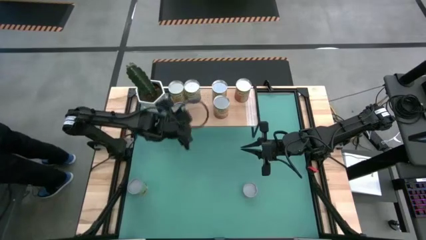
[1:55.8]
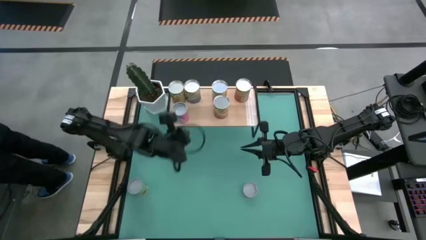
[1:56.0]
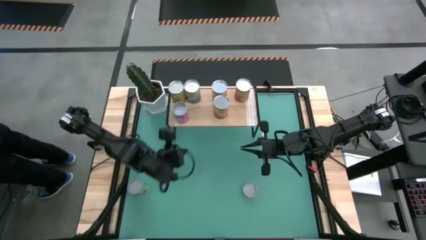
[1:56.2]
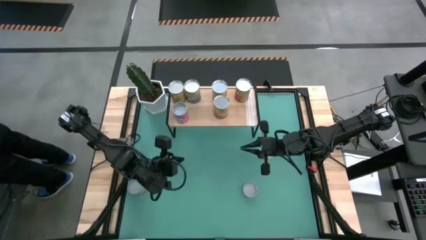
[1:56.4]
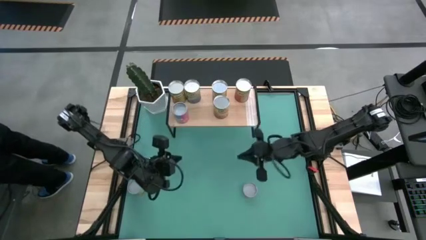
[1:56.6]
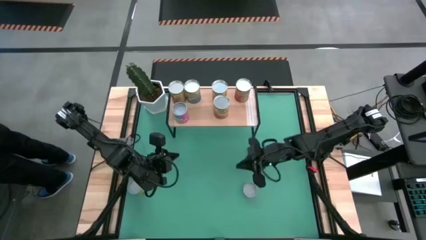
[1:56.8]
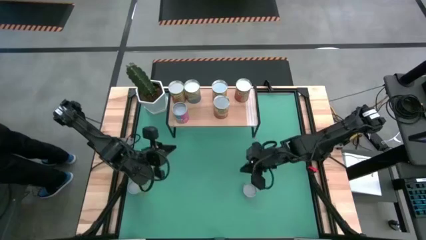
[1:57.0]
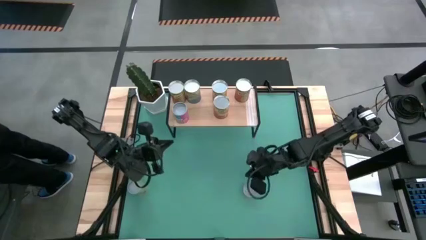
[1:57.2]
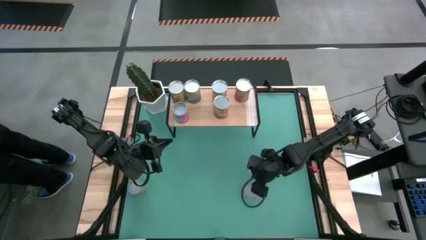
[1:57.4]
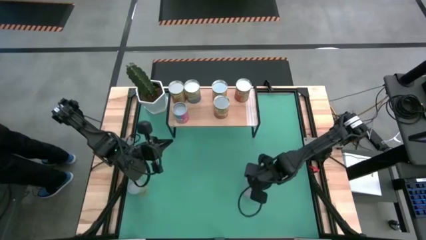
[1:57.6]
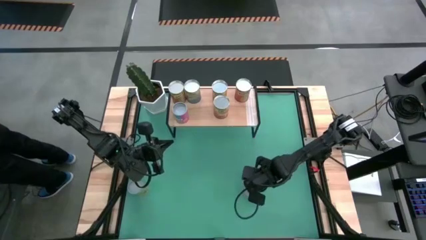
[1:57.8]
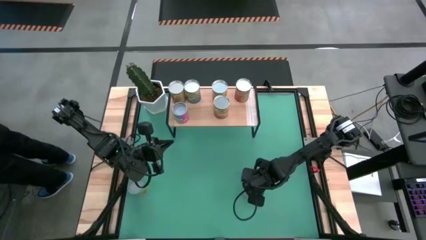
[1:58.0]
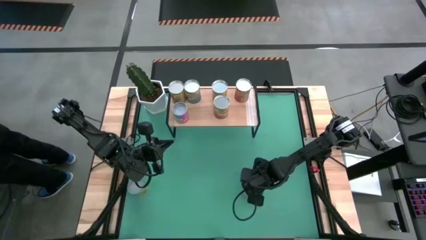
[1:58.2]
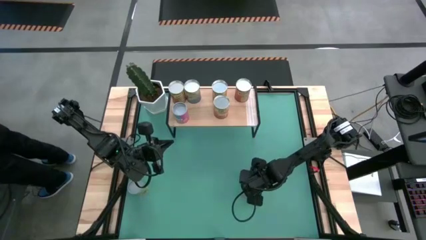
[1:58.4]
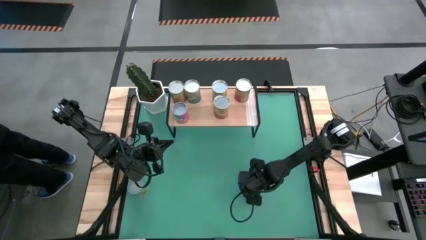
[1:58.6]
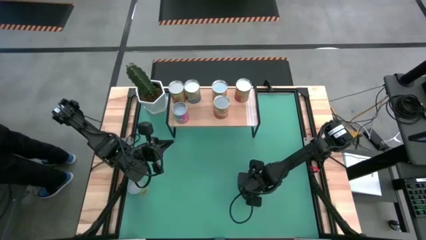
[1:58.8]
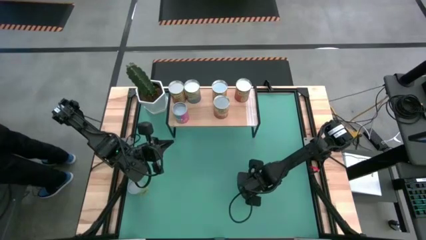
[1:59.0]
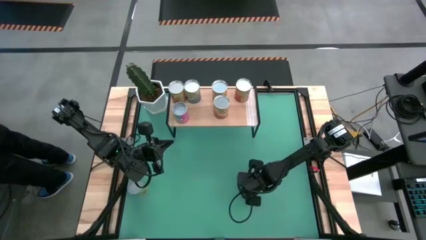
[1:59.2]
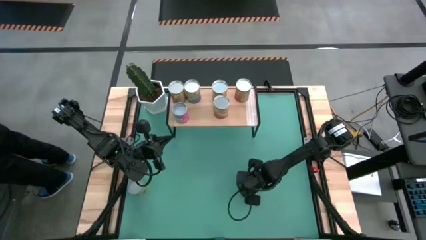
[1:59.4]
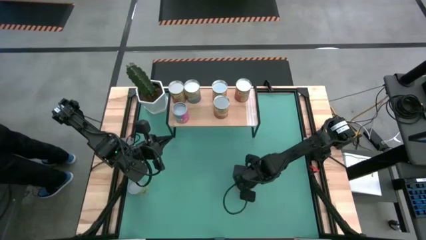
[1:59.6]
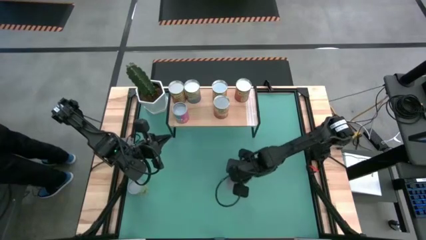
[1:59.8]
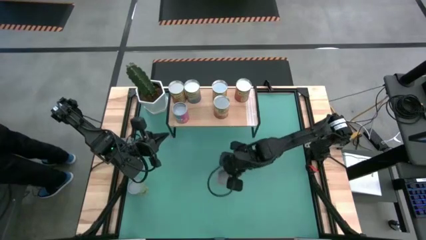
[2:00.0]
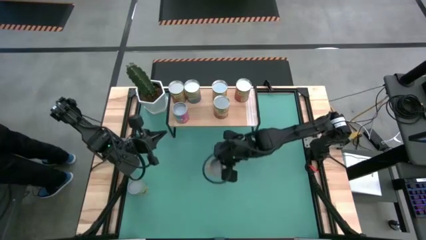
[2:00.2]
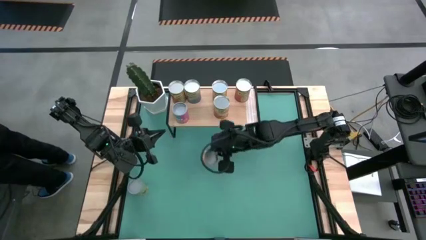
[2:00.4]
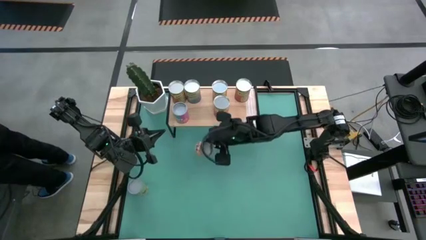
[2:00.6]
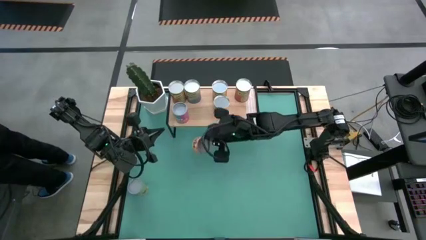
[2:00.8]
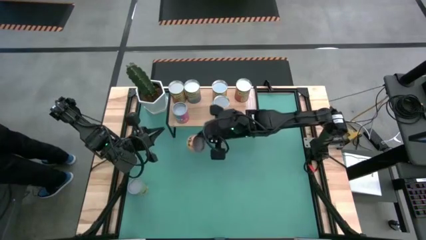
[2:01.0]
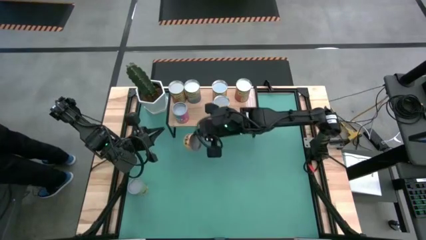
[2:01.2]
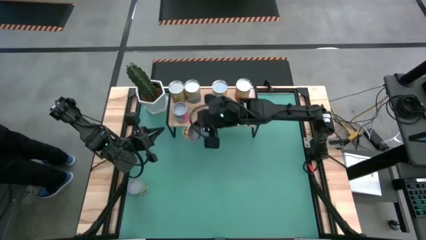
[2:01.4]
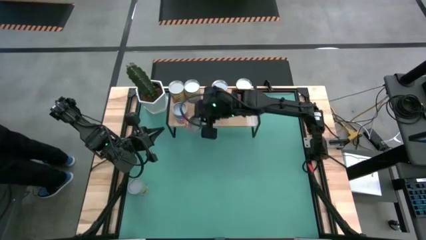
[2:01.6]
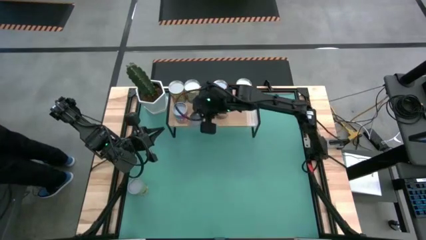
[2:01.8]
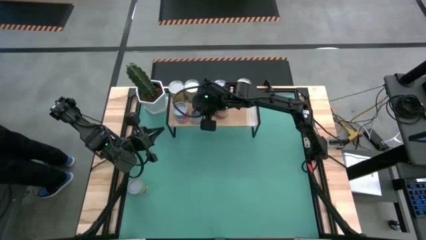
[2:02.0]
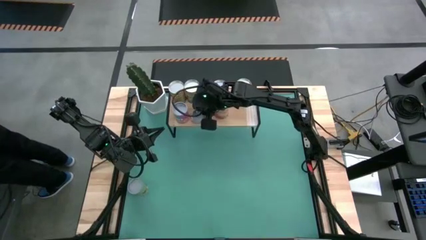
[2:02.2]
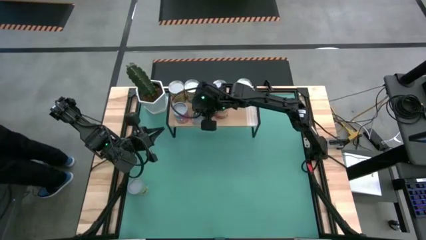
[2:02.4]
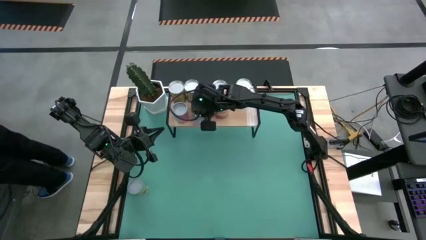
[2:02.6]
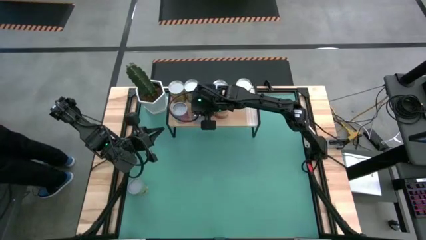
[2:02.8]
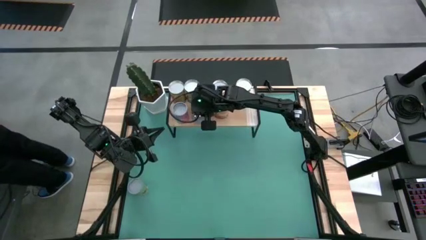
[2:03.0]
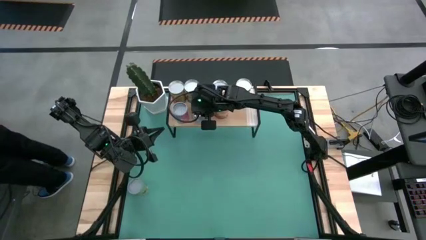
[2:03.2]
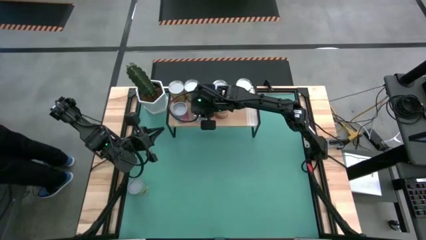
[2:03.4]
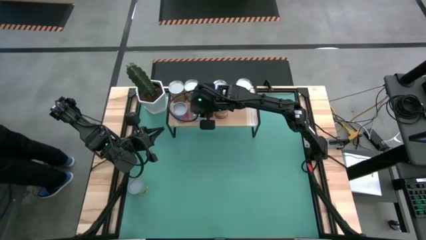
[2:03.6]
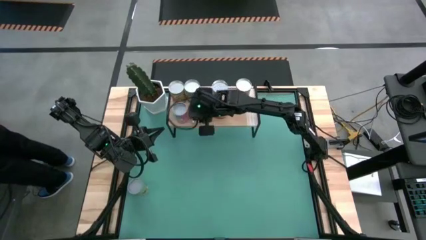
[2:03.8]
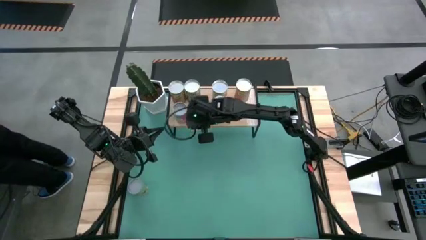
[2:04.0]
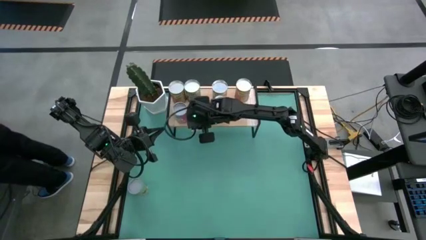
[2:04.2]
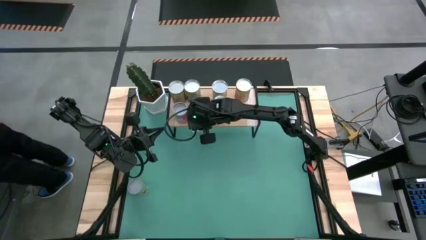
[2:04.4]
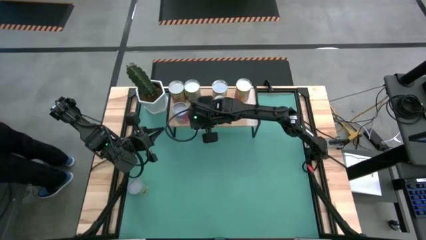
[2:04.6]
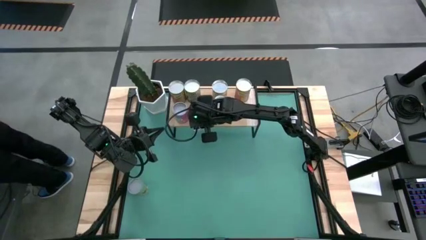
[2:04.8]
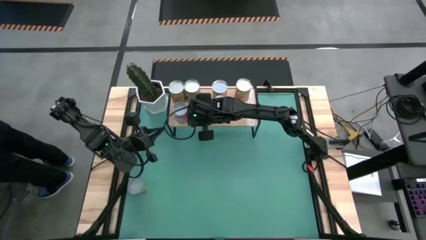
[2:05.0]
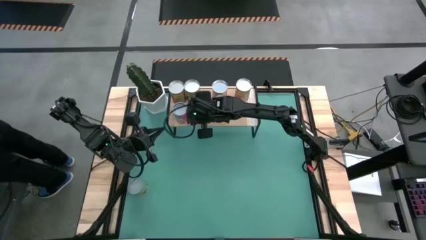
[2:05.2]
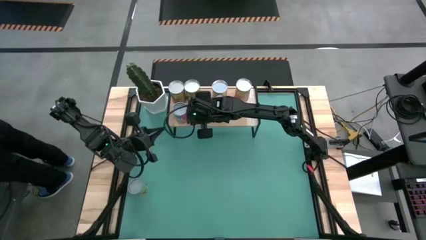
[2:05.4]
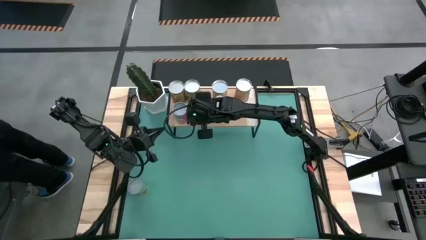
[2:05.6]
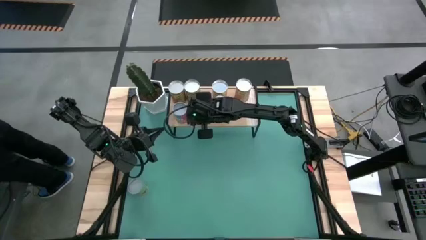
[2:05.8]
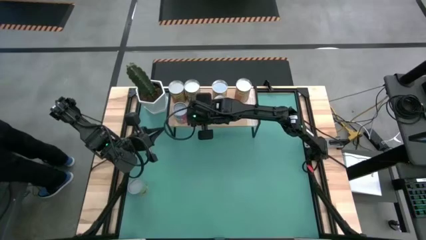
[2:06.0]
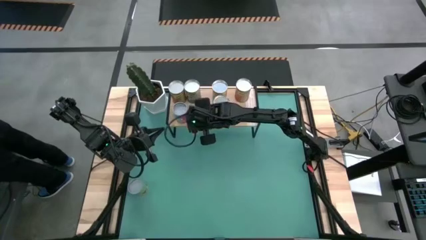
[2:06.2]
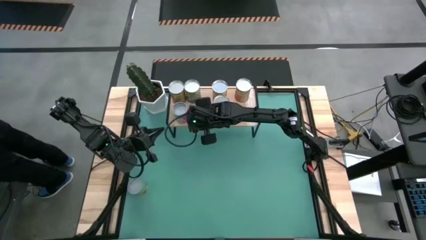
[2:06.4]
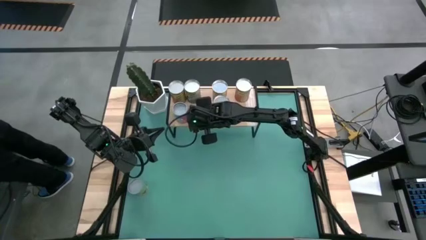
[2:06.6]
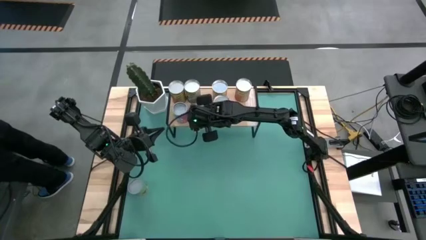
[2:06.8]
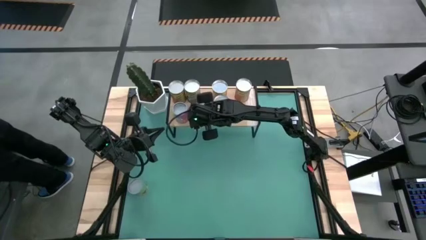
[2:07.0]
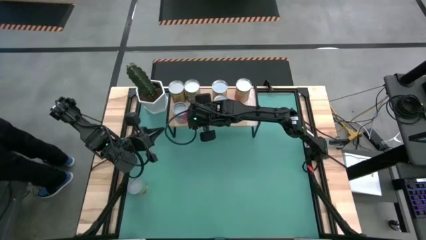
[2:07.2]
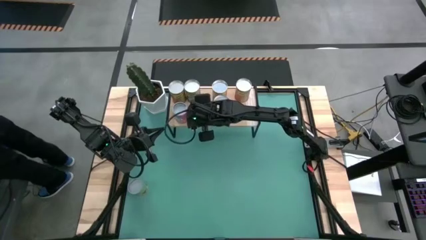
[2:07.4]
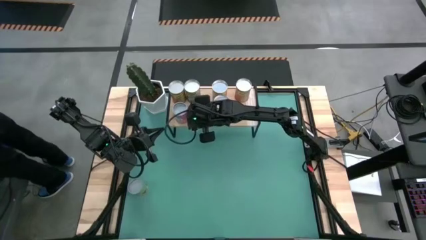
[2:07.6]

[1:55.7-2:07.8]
Task: Pick and place cans onto a shelf
Put the canned pineapple rings on the shelf

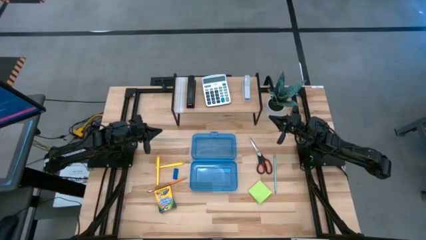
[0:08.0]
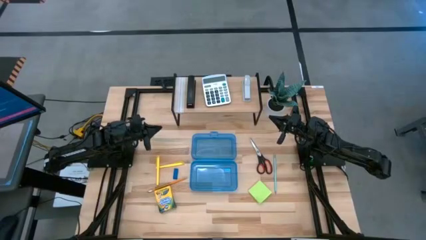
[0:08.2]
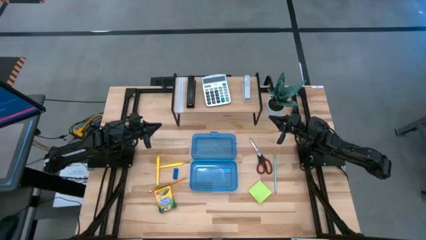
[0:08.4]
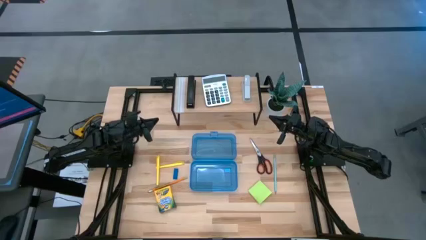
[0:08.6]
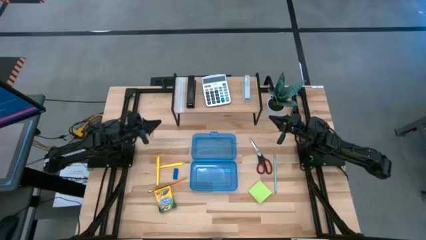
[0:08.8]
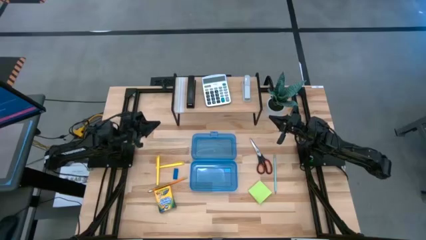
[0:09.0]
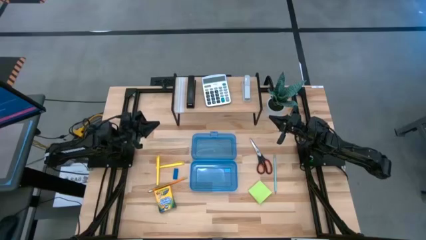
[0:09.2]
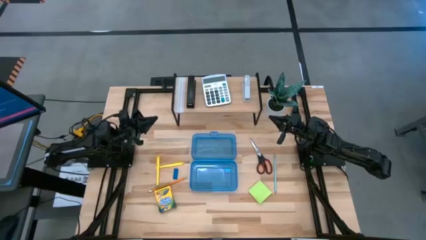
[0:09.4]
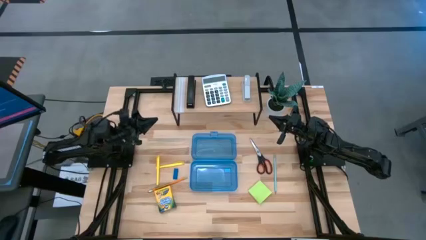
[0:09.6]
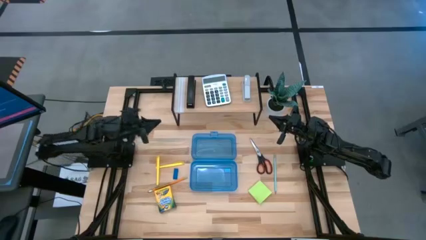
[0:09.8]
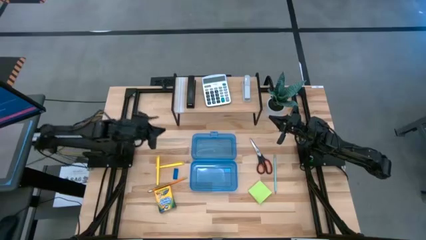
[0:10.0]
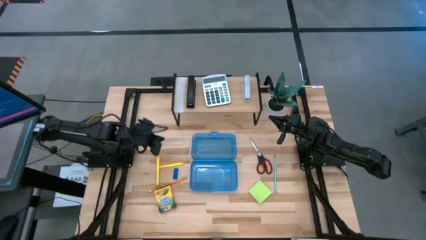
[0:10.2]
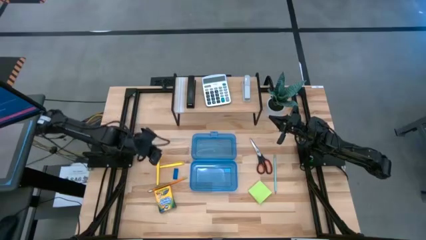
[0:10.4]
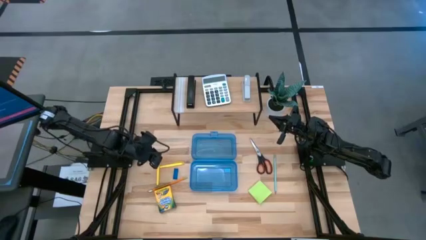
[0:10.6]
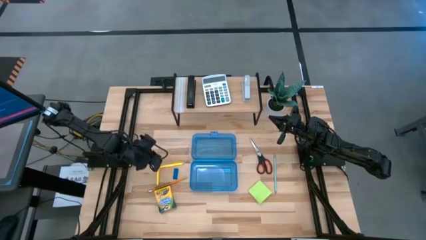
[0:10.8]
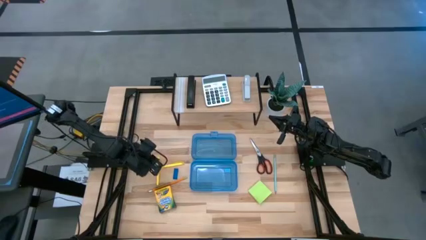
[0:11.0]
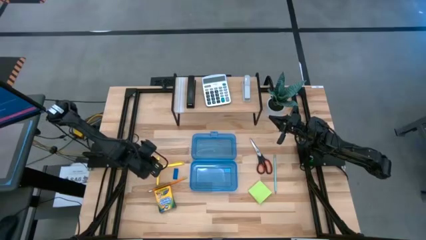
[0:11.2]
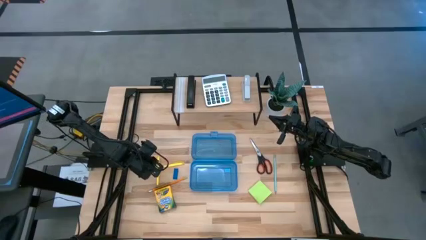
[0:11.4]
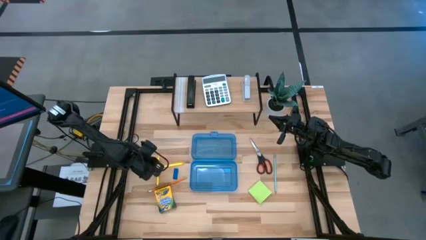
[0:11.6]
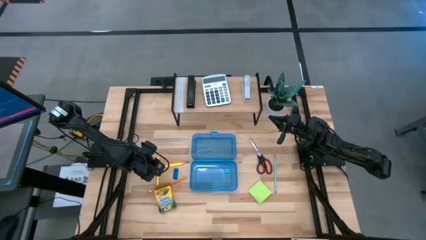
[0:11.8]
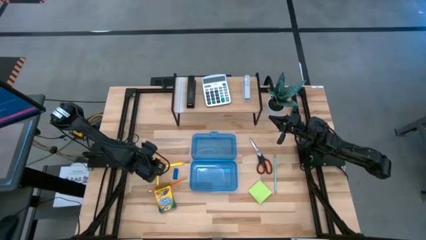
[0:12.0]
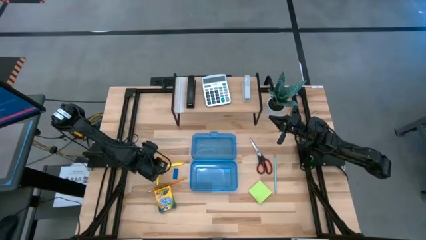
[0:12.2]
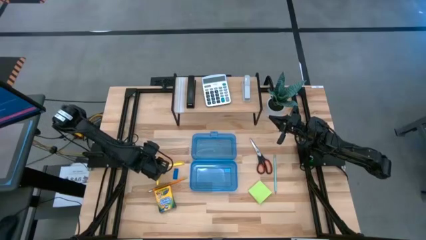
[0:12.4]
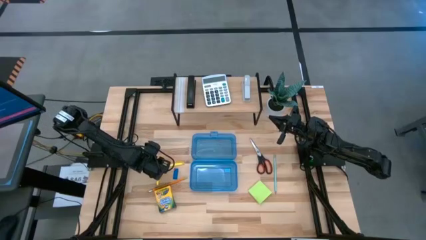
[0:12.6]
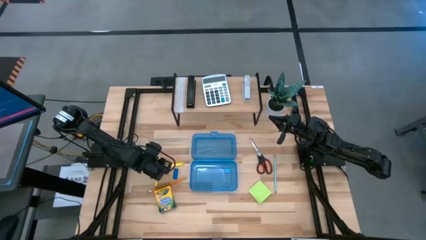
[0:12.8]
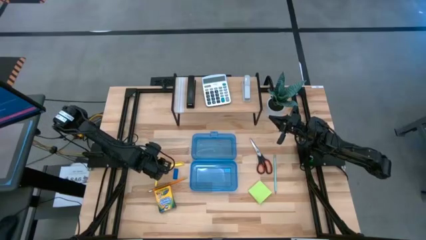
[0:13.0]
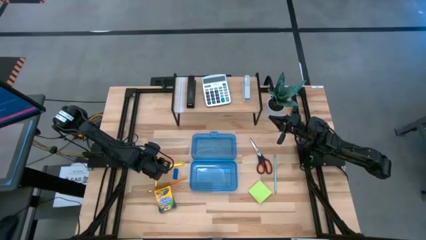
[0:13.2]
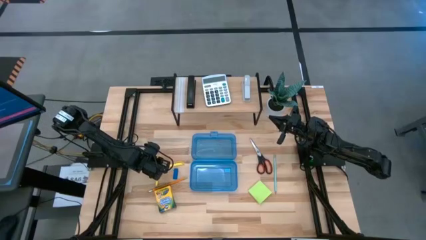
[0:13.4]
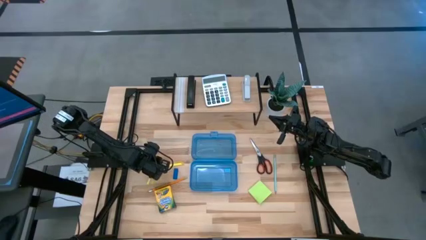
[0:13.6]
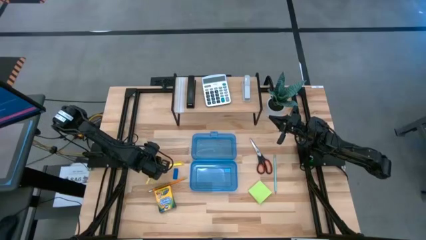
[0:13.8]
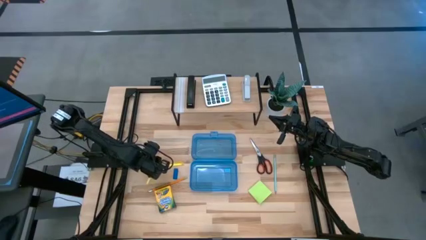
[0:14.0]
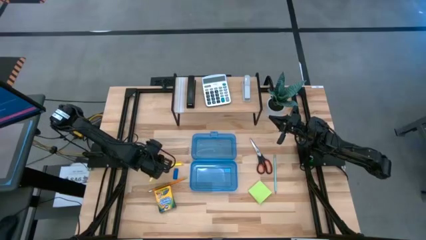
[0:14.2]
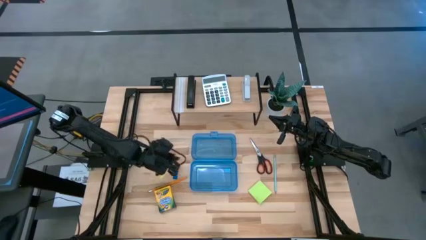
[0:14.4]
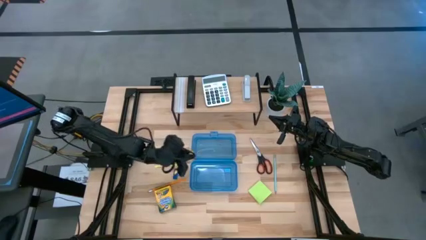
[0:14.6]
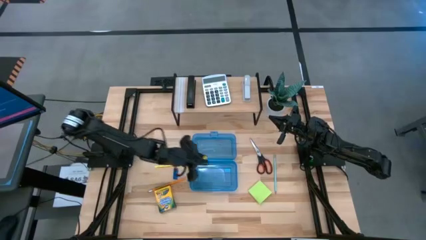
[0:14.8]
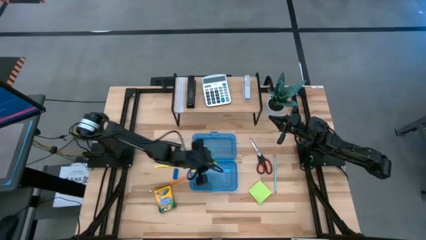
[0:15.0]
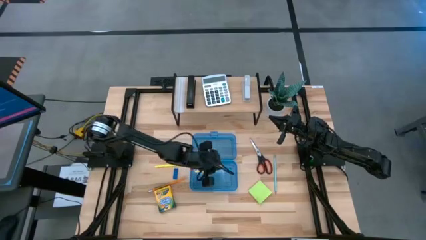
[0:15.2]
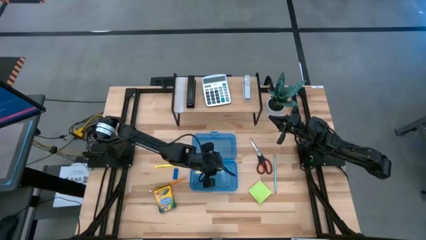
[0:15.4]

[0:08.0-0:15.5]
Task: Pack school essentials
Put the left yellow pen into the blue supply box
